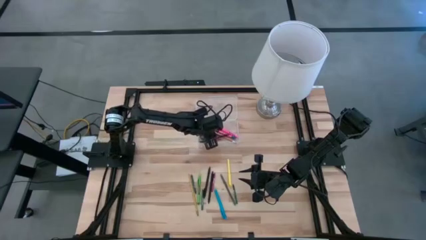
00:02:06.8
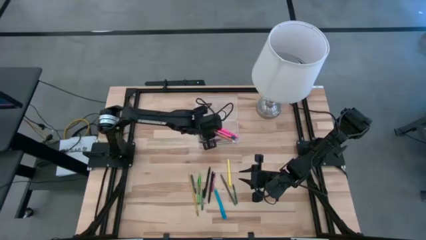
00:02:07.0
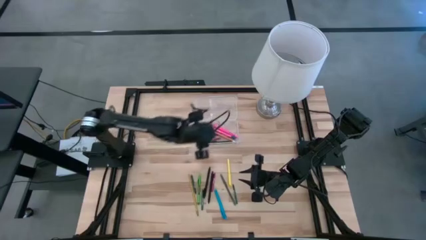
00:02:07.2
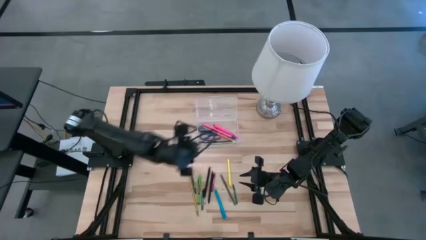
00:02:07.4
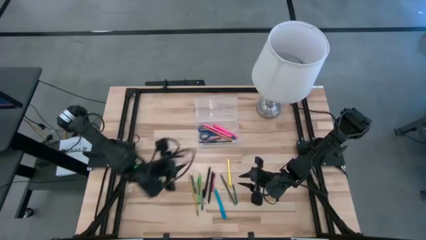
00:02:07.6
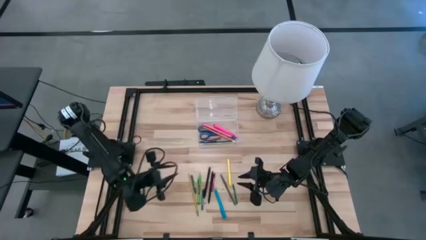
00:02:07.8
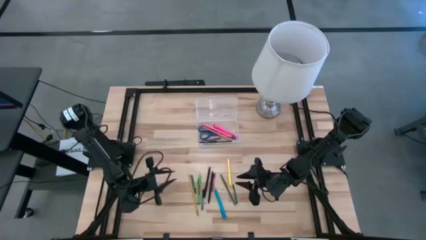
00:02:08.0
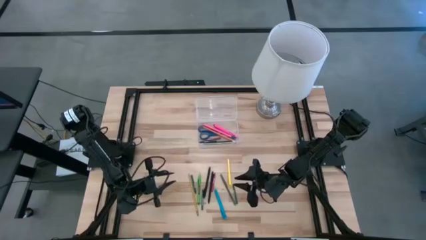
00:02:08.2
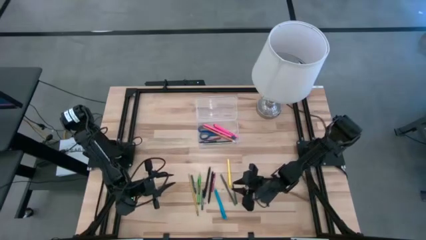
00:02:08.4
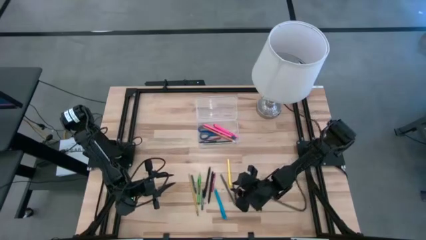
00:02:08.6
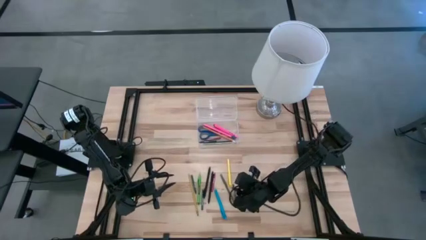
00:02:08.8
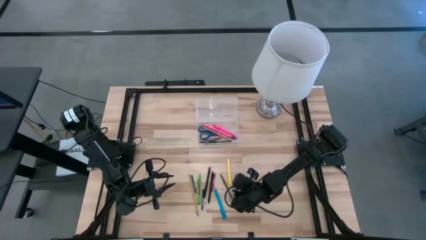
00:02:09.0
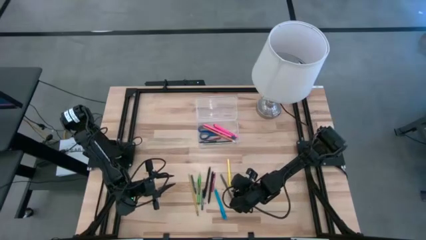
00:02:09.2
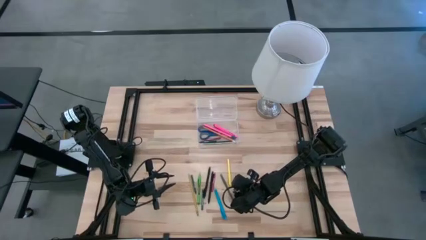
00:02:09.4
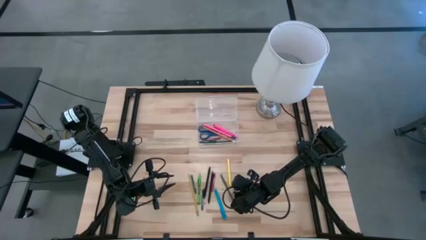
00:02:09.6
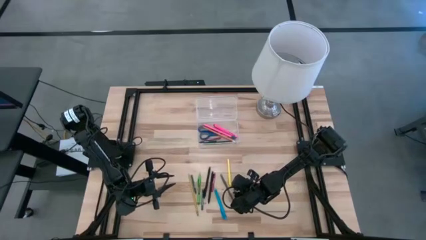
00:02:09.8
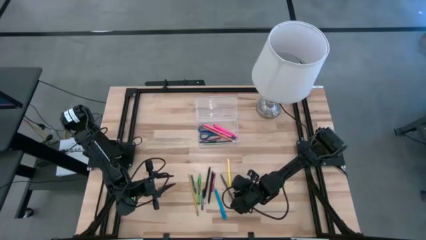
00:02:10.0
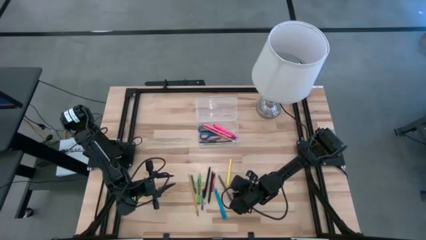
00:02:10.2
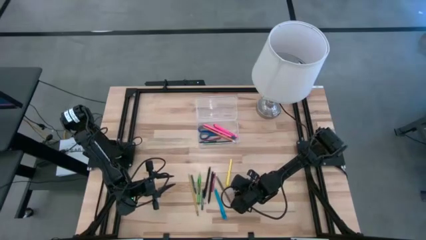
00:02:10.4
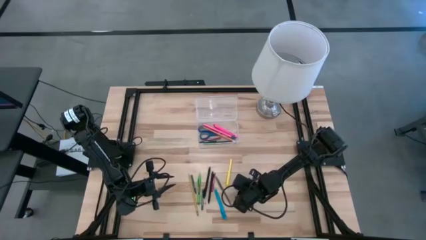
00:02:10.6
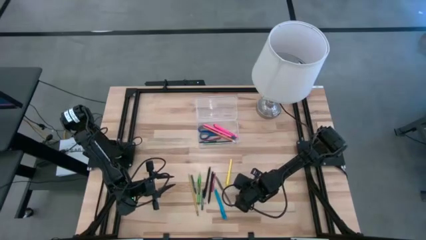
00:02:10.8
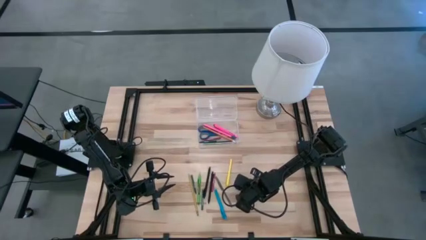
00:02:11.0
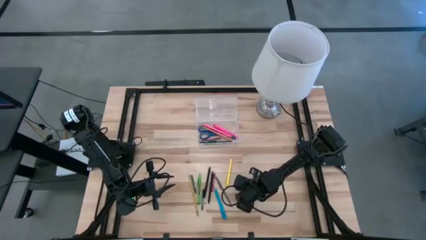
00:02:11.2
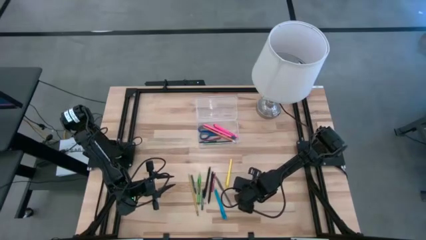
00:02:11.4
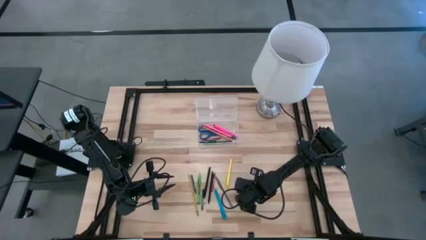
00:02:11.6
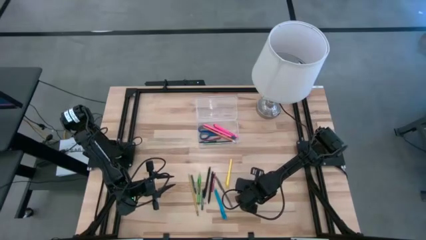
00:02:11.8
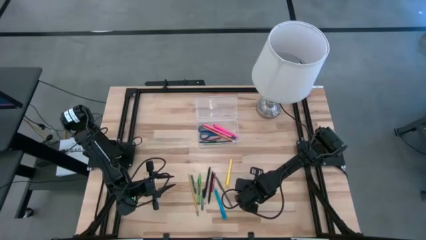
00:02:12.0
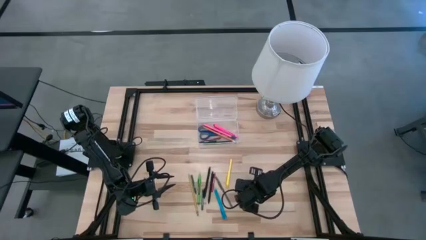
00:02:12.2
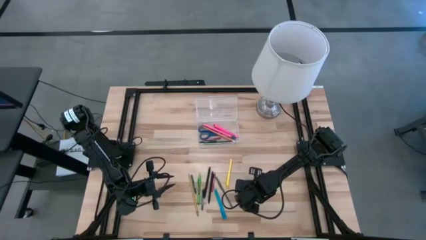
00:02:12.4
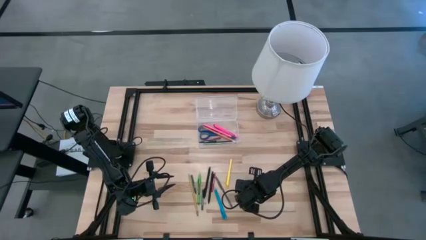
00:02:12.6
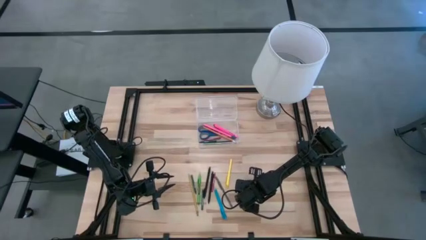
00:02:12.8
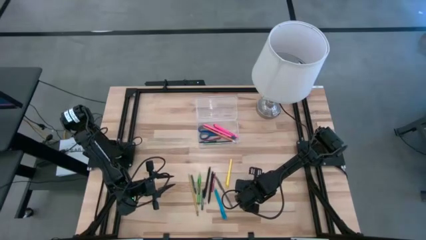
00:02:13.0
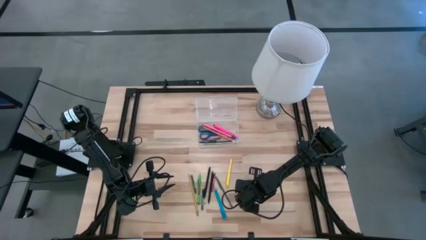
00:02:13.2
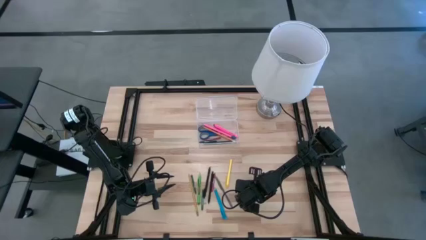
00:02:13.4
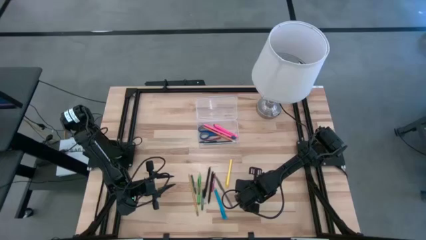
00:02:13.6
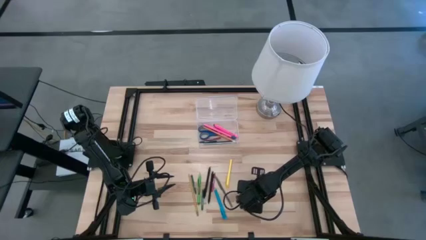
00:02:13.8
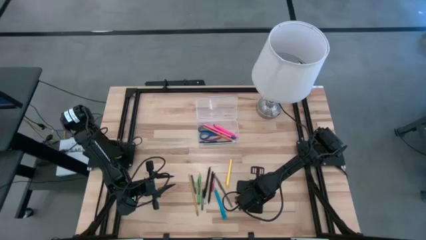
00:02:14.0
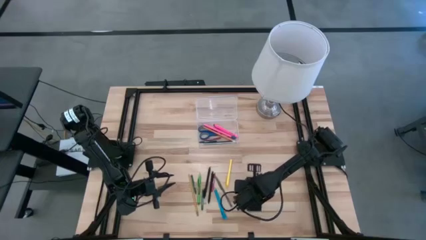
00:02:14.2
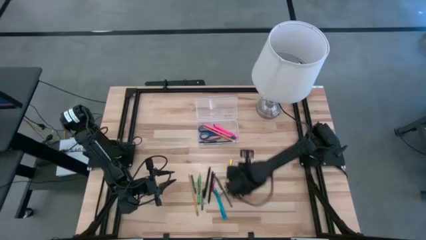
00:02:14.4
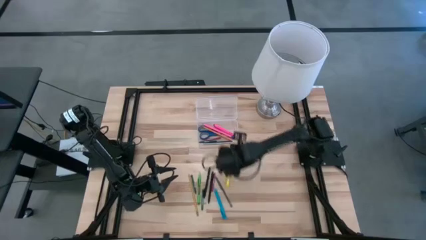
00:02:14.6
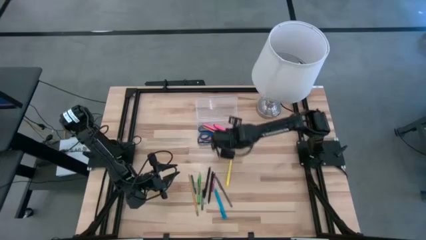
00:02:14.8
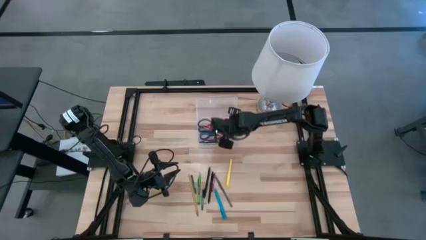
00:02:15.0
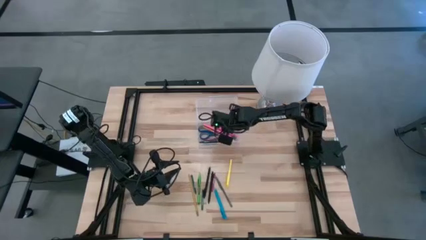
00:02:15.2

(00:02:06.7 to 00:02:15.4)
Task: Pick & place school supplies into a supply box
Put the right green crayon into the supply box

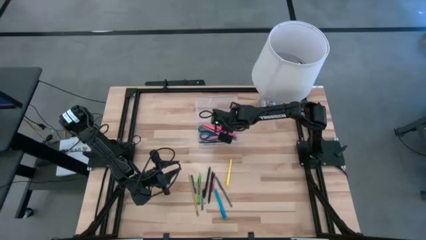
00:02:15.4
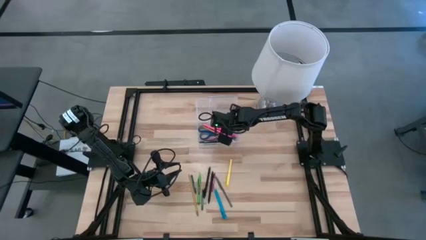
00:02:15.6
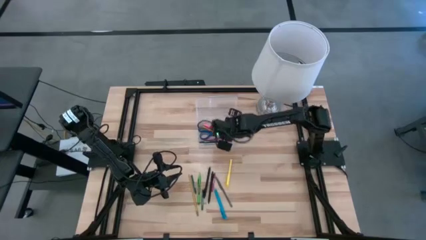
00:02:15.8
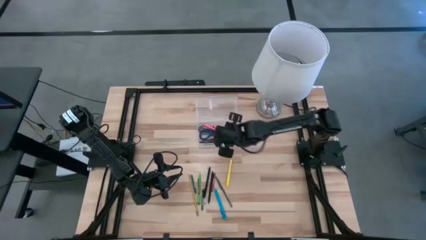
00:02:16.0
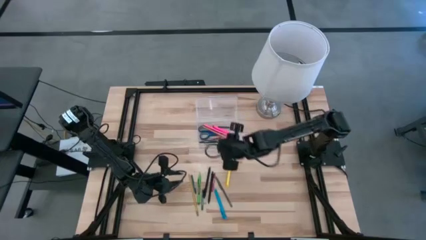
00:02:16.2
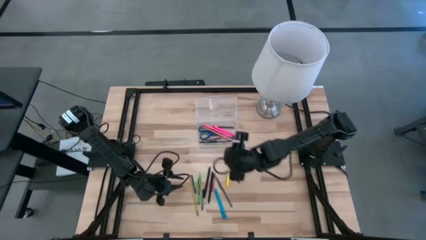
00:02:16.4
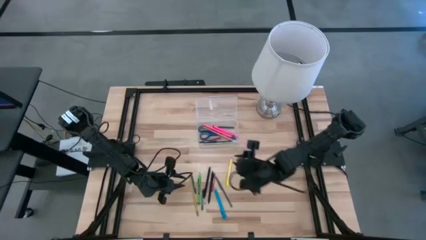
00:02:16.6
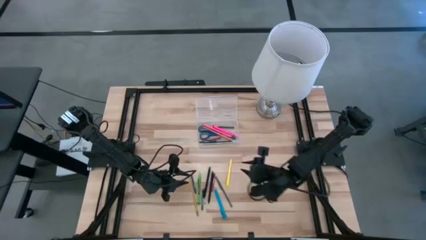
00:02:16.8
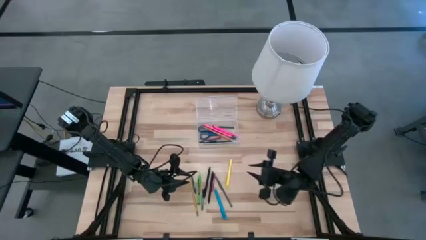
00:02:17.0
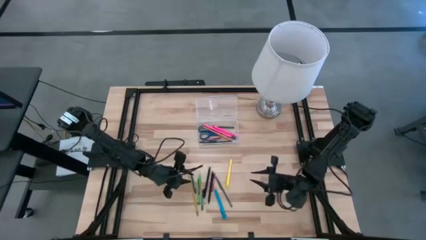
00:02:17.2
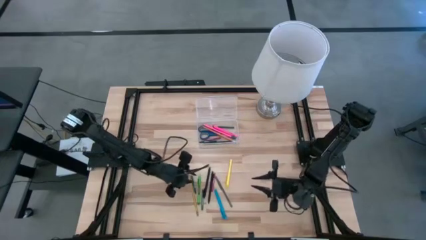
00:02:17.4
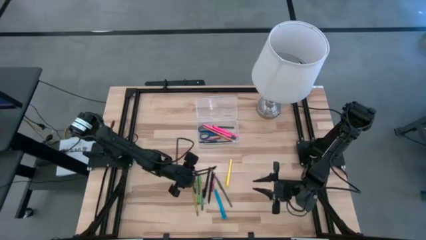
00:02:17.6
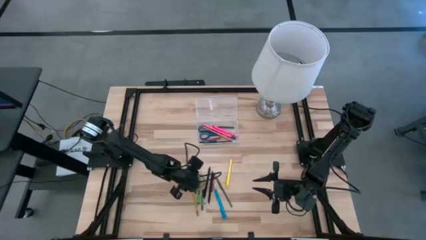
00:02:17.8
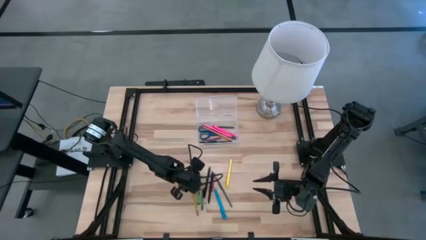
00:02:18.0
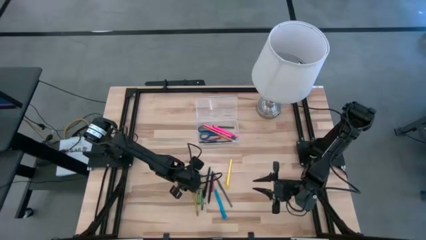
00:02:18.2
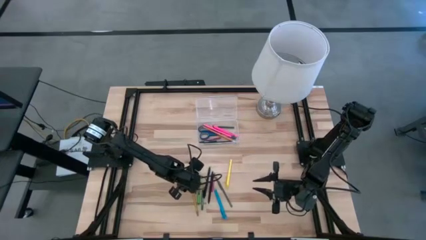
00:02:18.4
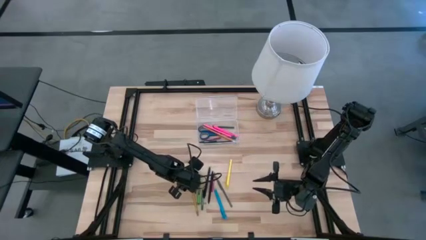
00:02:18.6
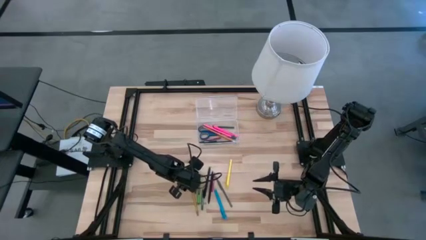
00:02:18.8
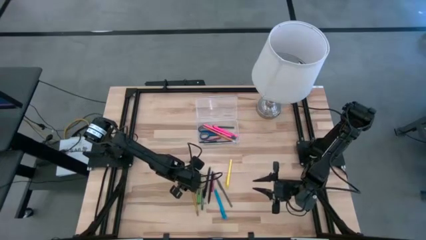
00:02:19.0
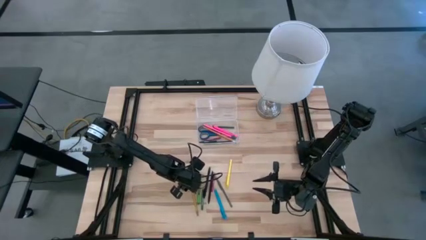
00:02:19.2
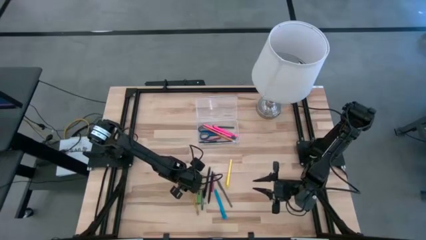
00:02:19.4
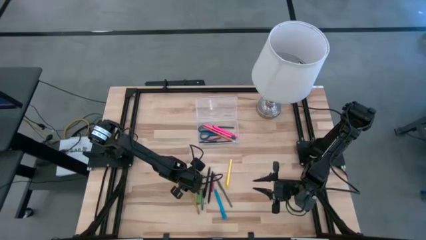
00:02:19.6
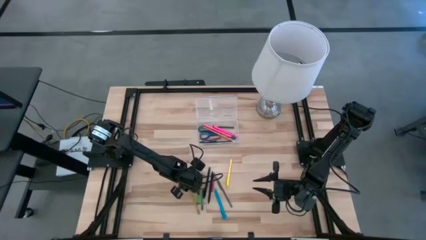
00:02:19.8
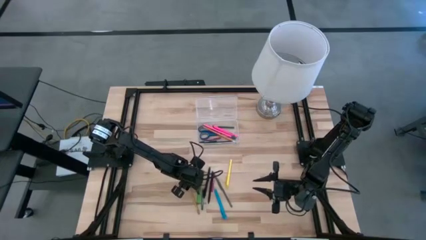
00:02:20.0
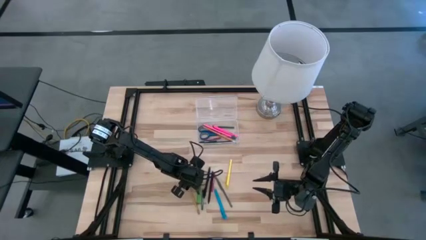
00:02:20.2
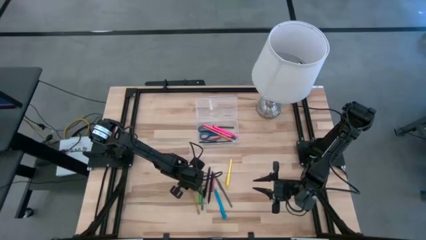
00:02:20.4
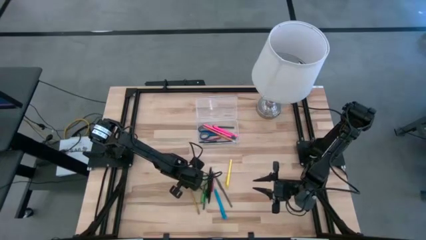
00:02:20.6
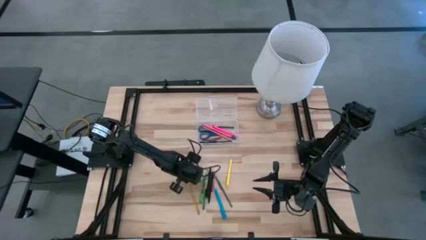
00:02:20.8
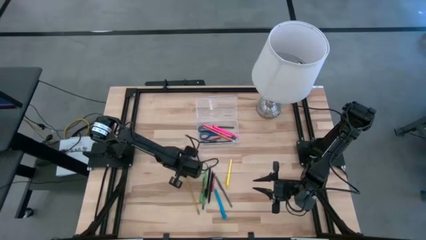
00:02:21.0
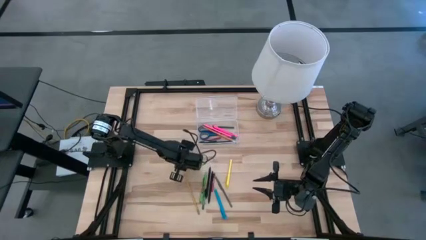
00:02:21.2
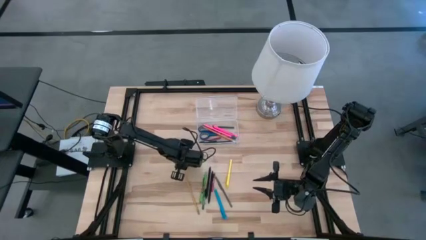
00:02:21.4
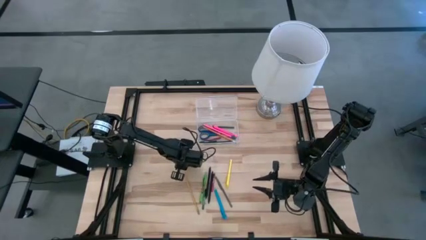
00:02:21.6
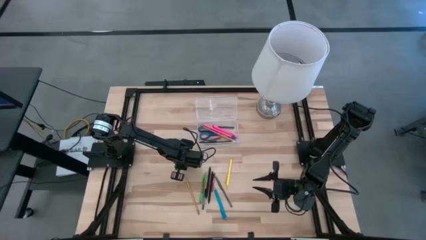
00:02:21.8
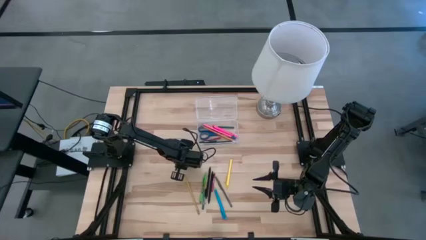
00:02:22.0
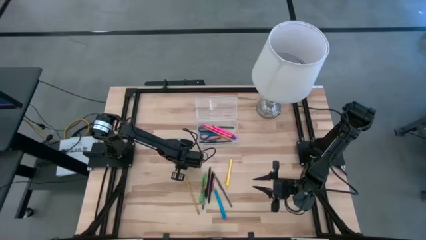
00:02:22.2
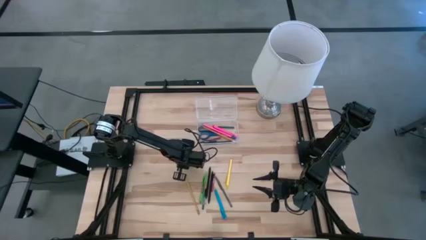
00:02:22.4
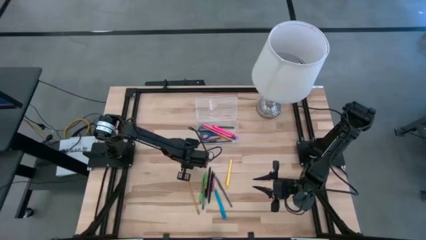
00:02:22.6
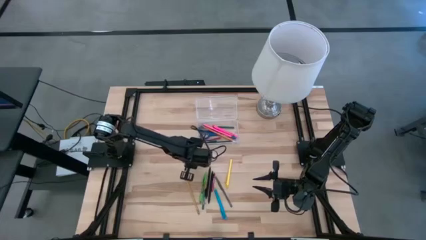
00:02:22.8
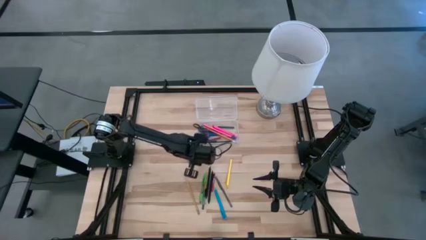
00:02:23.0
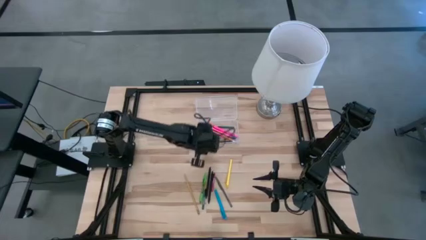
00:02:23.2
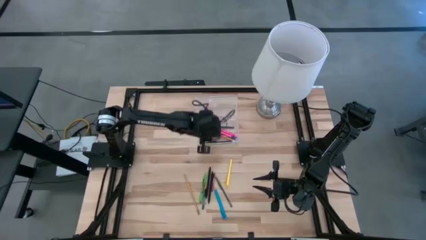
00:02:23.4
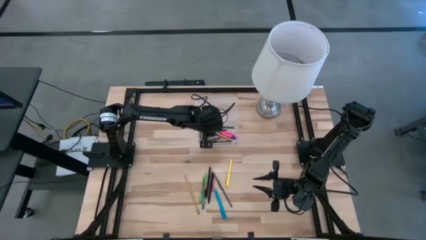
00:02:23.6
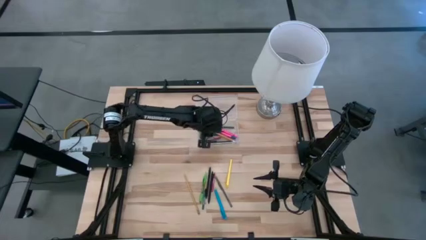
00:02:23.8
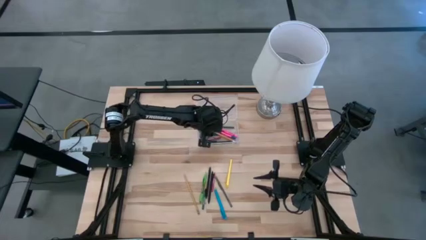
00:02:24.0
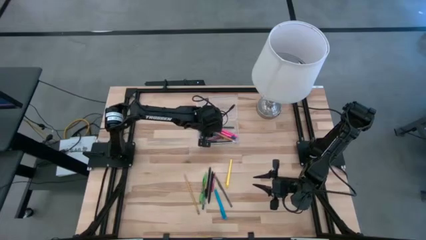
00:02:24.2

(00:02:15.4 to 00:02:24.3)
Put the left green crayon into the supply box
